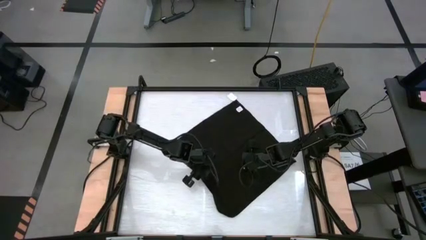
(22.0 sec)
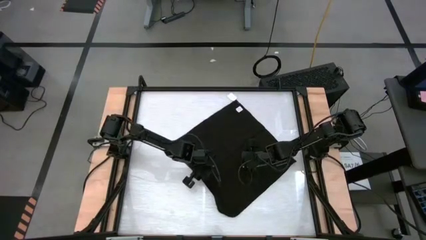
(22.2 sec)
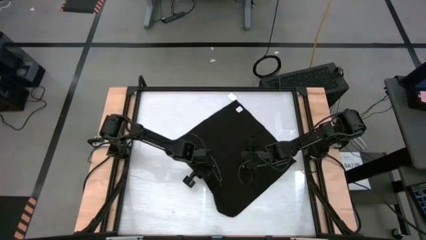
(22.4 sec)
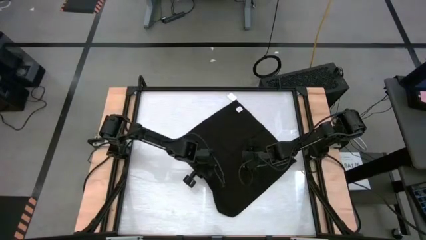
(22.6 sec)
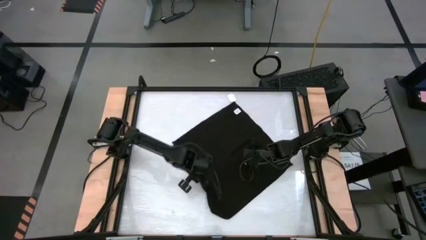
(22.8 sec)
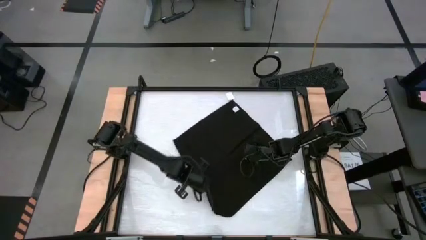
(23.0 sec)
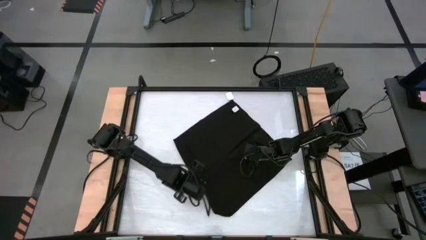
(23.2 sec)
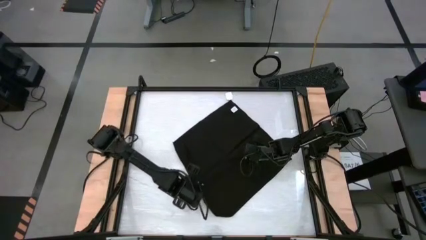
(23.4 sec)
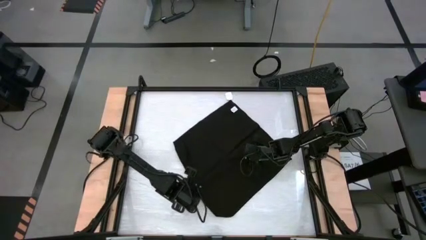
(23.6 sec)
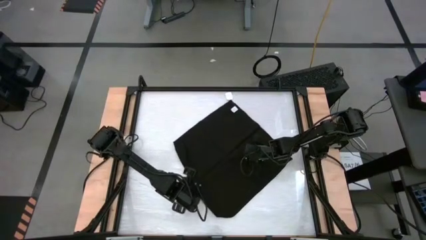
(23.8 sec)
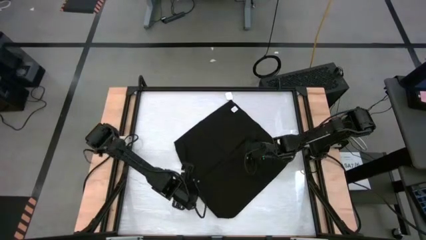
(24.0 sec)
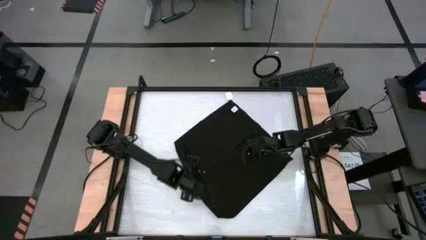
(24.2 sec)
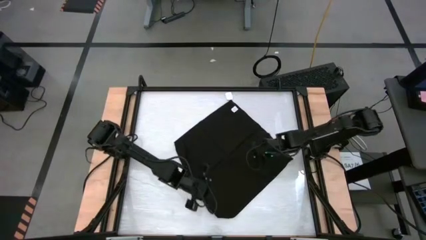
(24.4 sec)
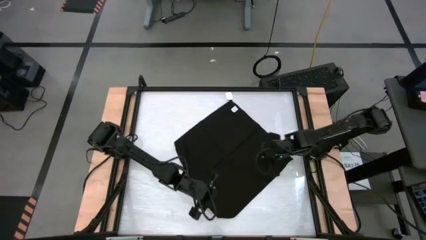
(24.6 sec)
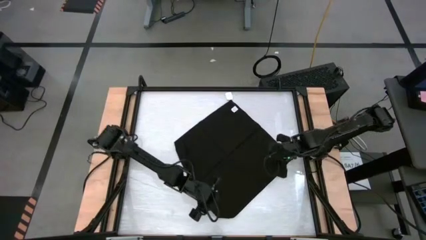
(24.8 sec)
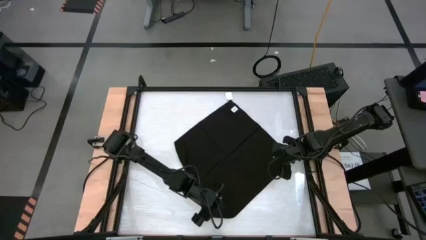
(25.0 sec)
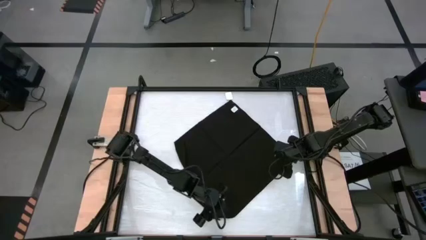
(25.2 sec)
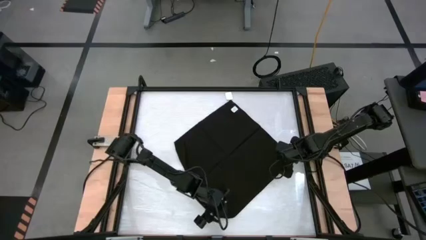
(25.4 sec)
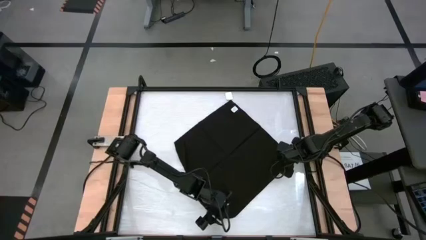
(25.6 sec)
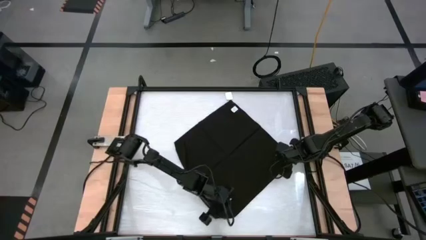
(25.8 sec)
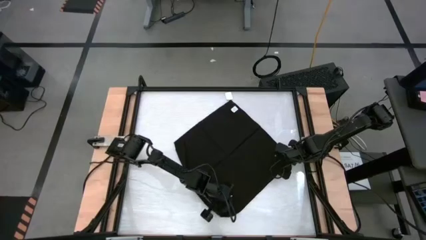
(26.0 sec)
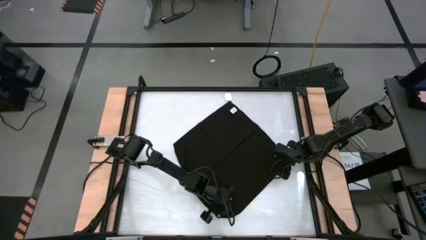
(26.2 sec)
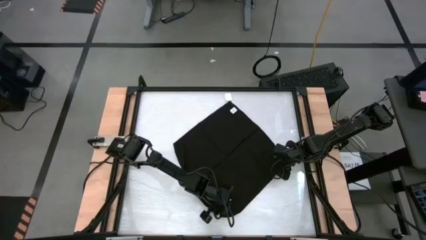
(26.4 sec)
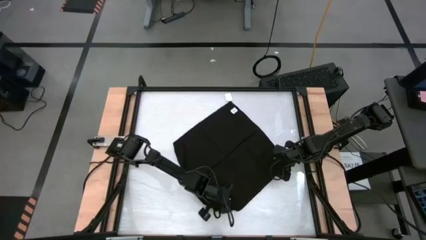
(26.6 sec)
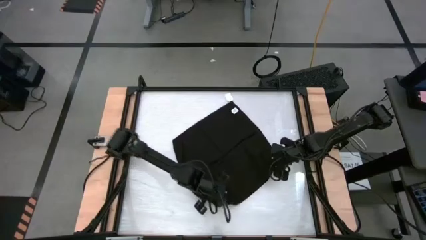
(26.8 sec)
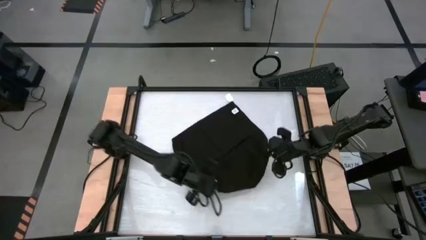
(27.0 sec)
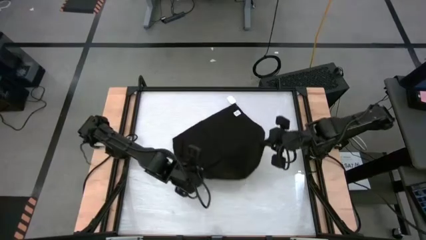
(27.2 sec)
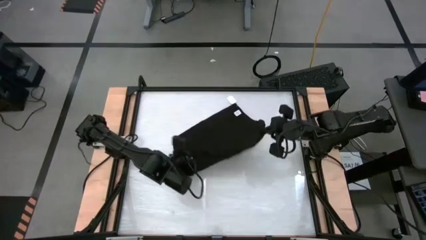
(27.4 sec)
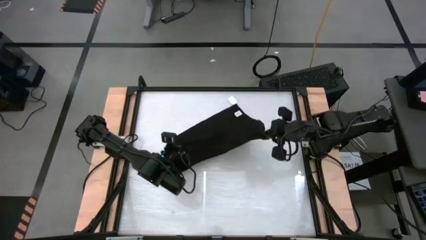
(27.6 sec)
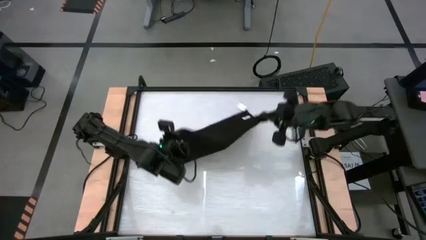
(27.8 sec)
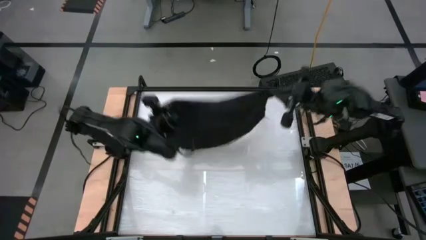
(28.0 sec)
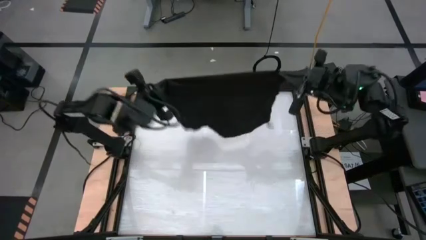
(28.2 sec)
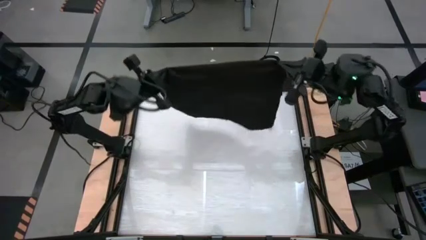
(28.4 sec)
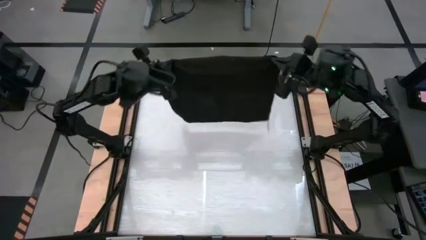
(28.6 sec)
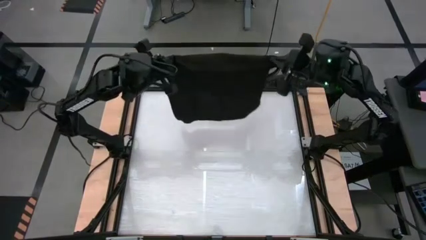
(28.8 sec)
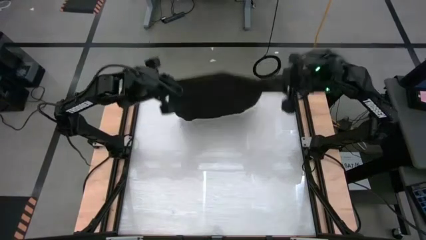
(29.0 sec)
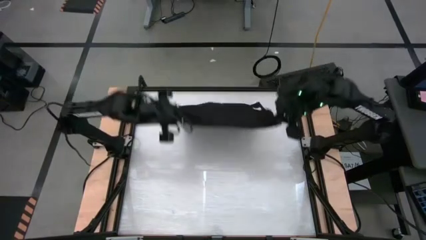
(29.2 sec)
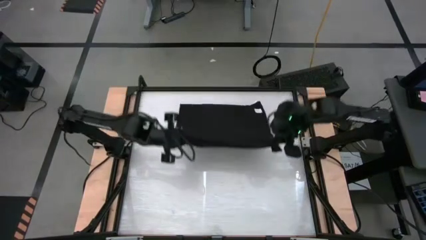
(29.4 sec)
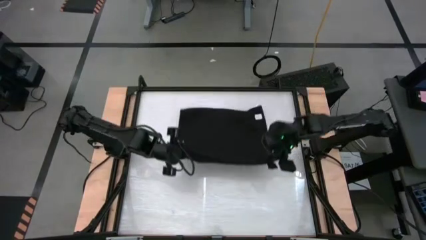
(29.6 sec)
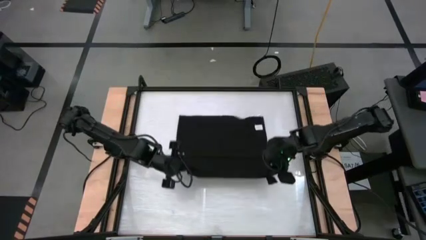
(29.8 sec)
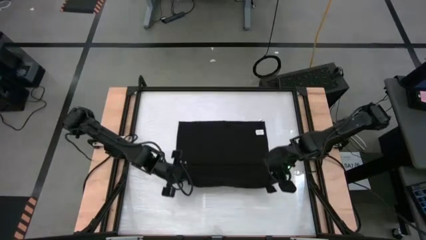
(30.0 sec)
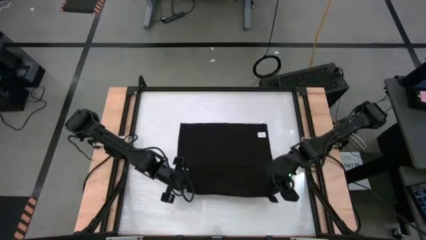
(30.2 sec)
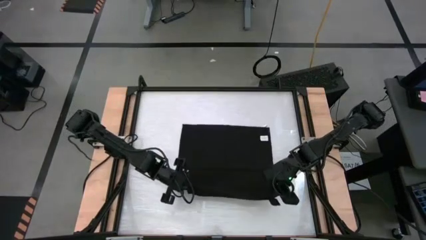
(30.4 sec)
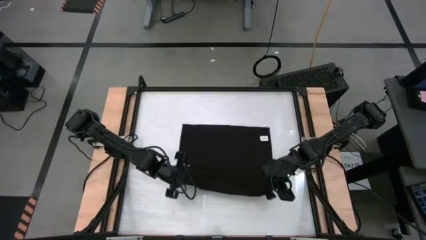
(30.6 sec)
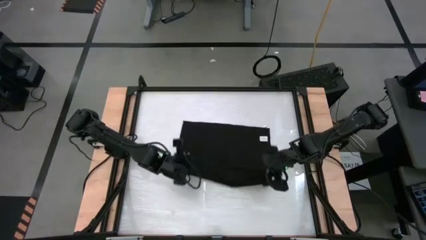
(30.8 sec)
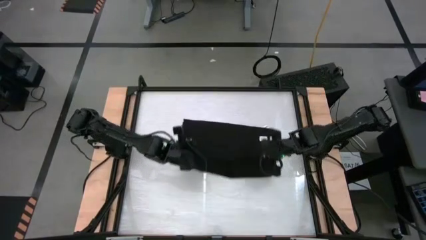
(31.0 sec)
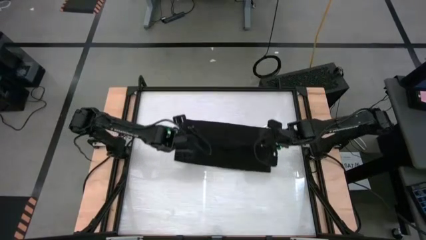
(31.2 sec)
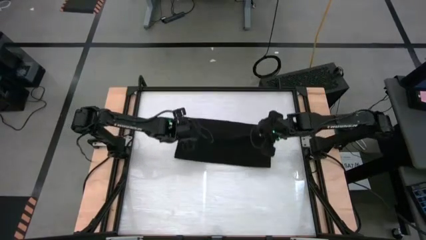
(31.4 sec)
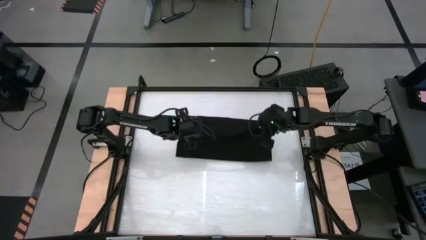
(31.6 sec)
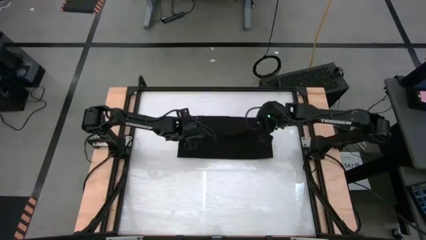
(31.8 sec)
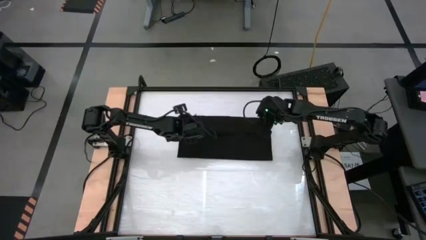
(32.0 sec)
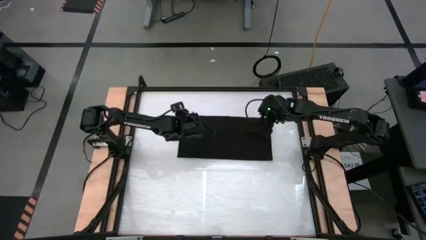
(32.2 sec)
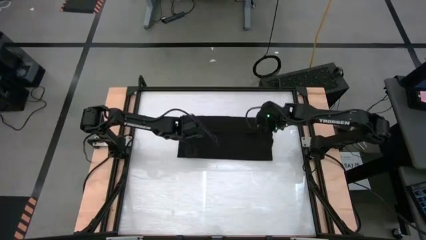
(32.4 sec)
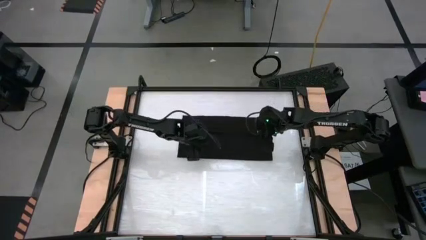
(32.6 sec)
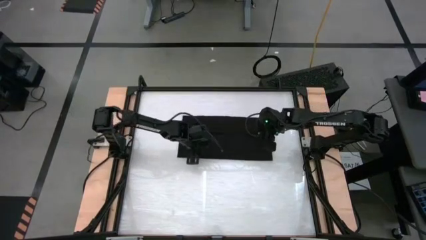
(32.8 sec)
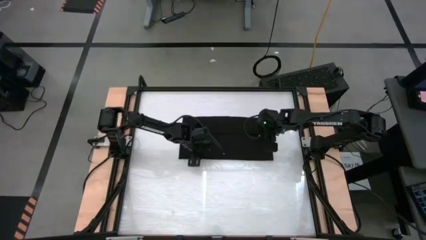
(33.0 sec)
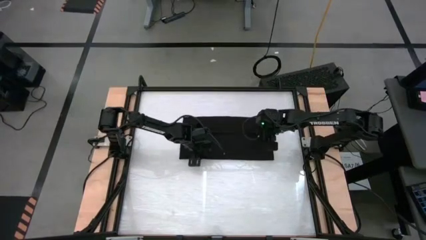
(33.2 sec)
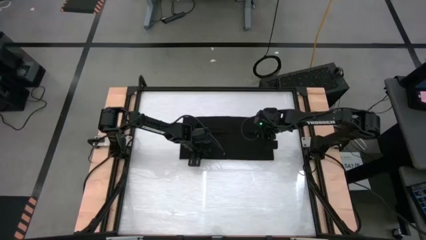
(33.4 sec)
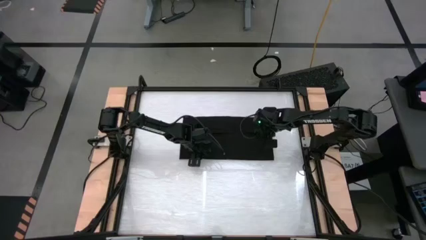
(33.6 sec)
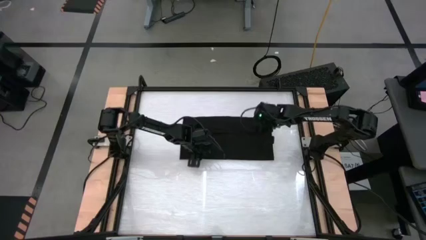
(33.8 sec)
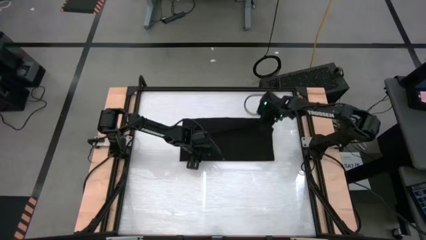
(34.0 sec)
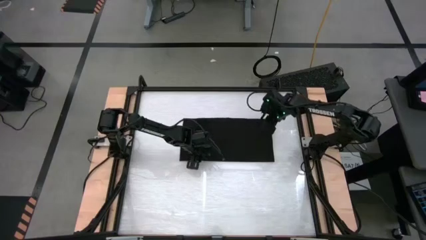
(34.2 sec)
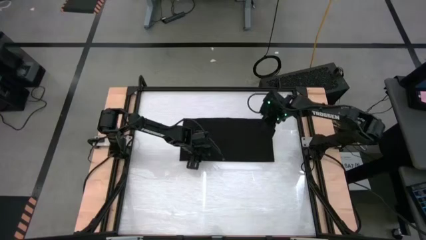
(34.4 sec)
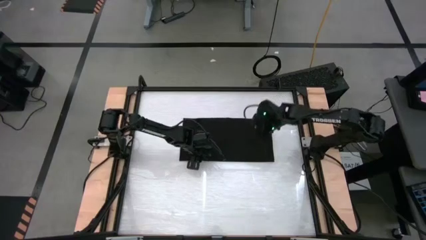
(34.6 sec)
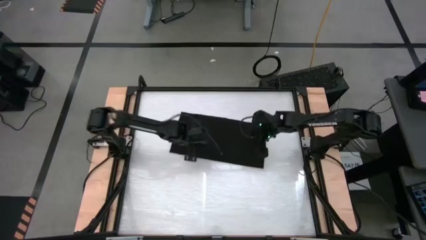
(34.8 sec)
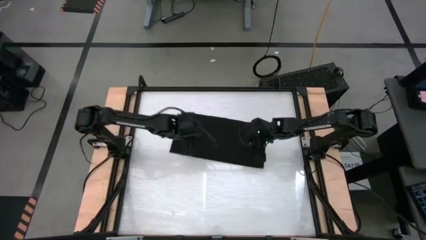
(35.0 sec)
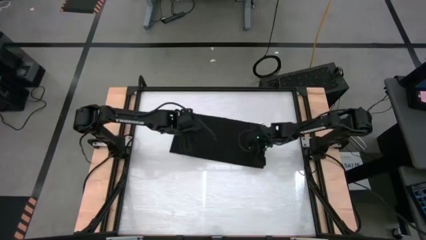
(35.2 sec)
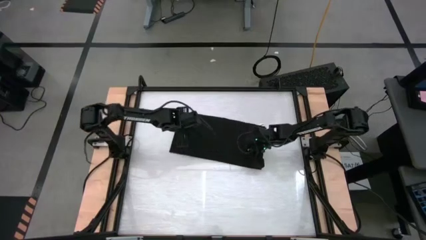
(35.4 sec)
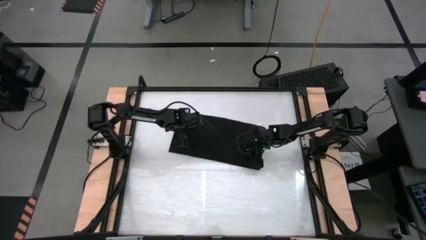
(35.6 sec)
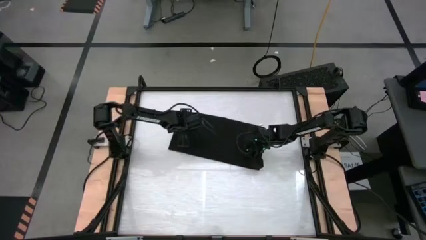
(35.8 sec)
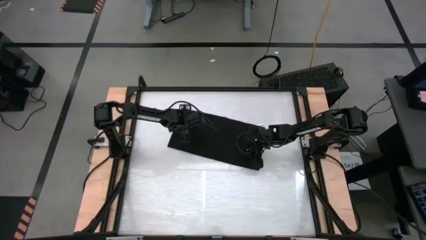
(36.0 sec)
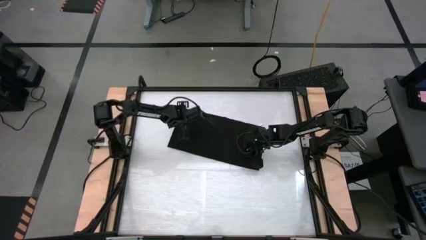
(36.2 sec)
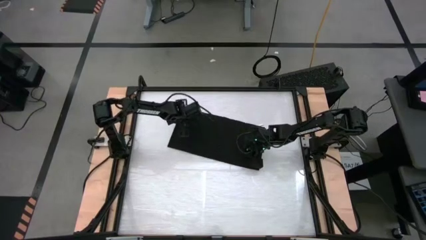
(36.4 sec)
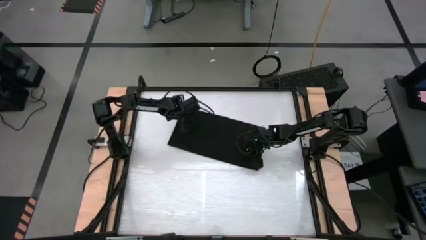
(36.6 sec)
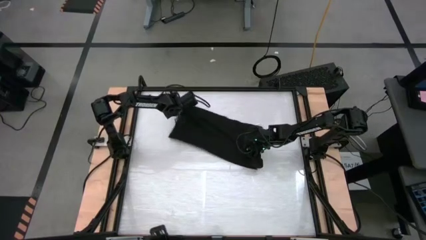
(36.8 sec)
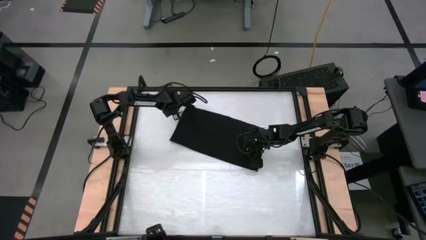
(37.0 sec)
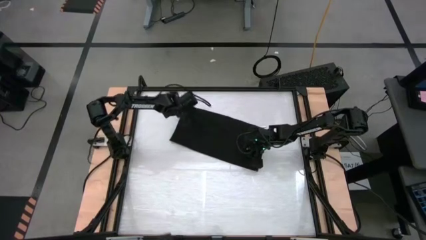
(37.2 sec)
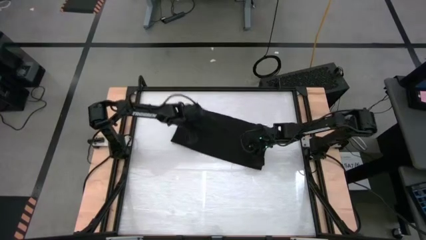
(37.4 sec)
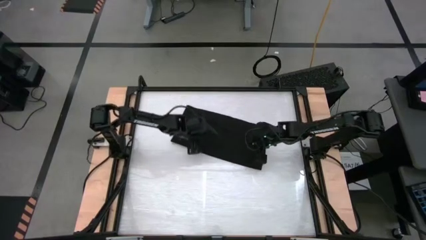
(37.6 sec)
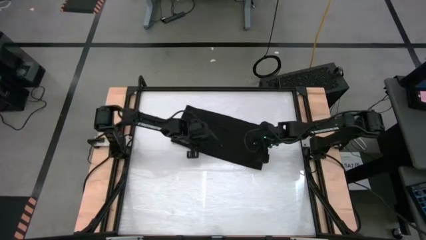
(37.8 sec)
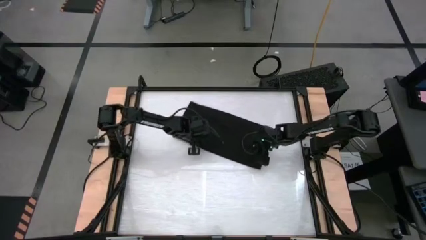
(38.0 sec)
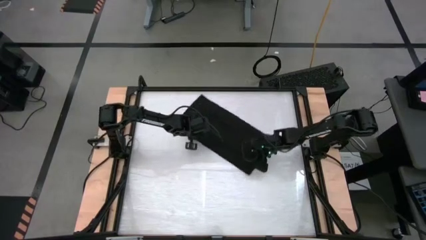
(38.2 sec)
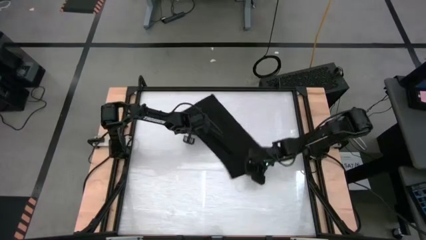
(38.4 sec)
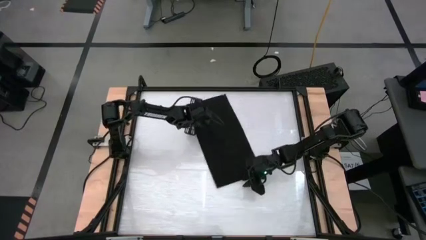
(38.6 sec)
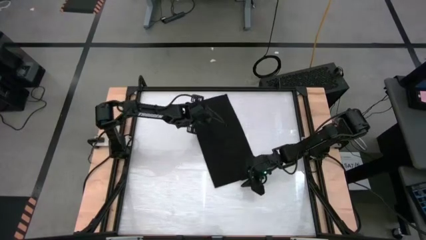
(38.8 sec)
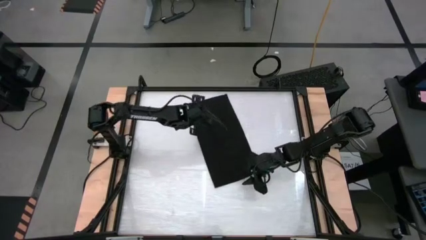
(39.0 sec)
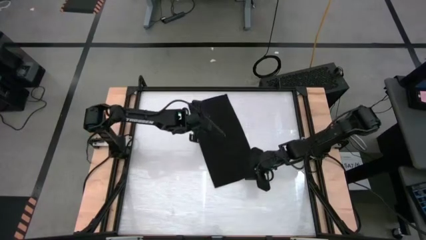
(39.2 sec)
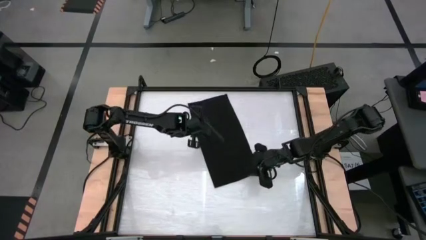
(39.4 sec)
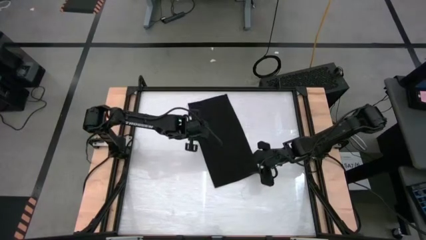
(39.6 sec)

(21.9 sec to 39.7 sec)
Task: Roll towel
Roll the black towel
